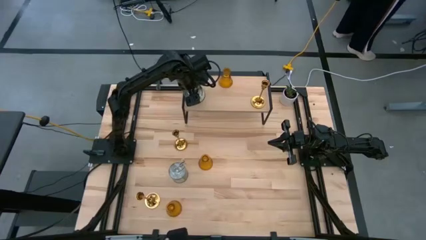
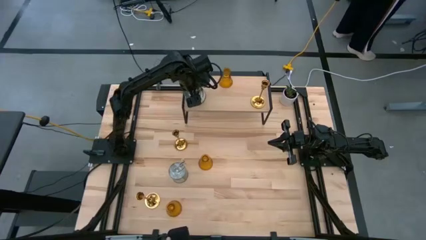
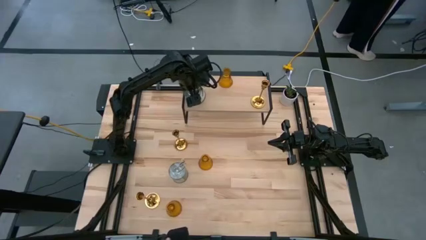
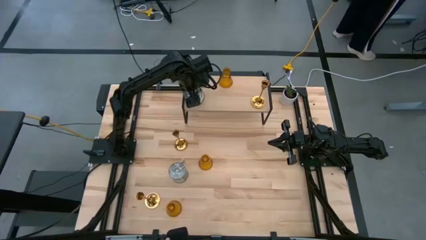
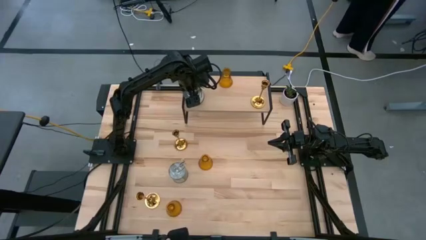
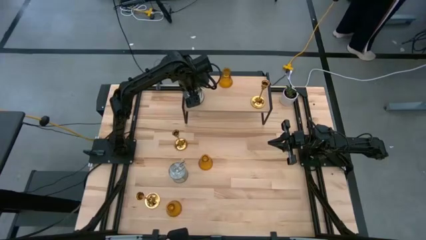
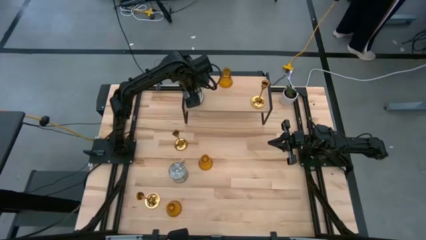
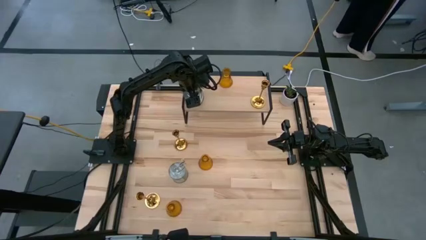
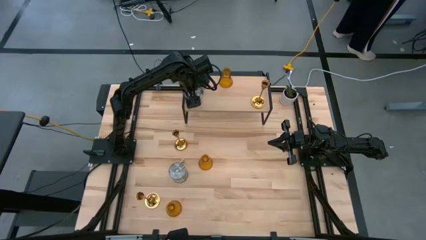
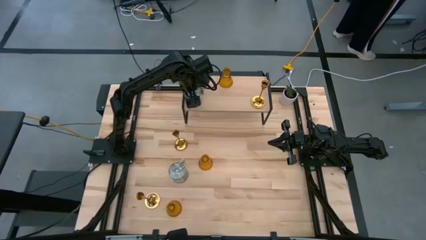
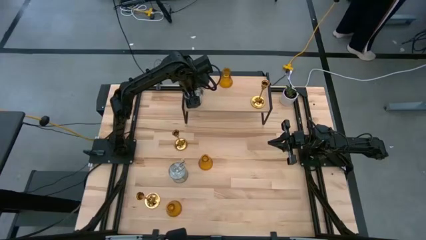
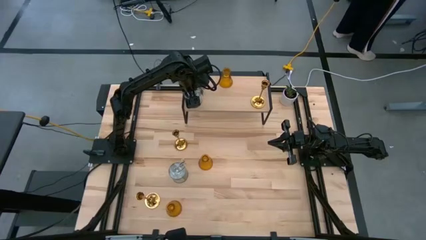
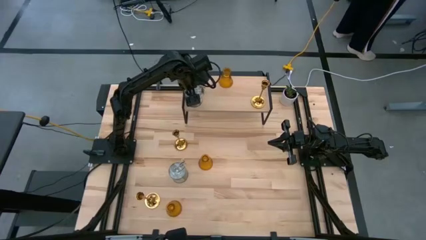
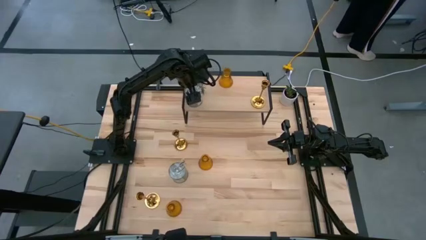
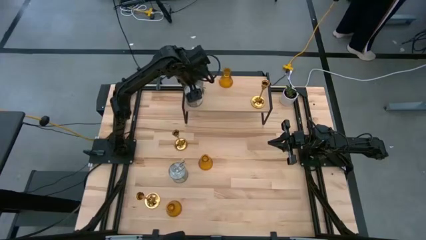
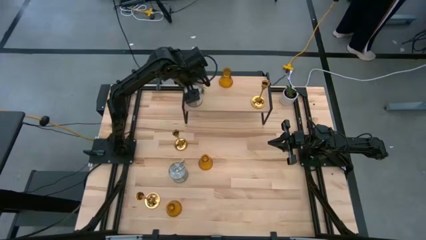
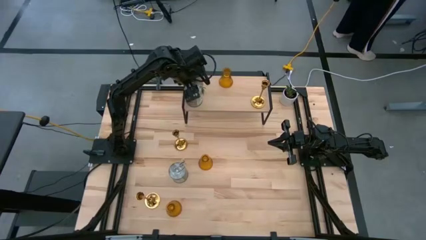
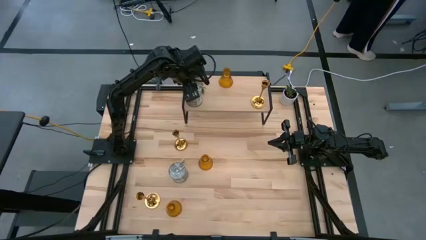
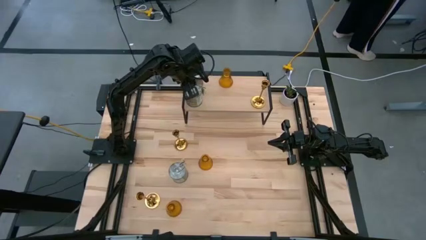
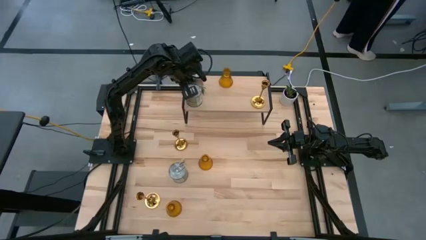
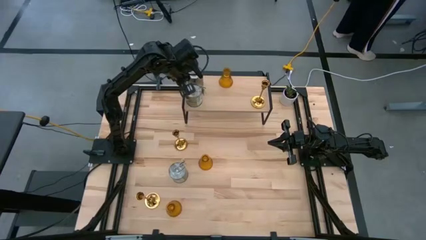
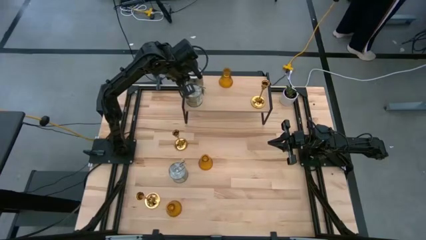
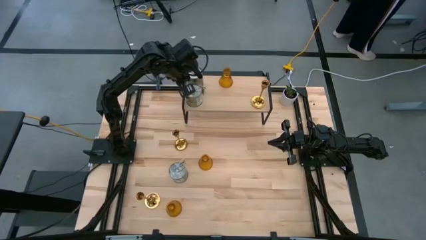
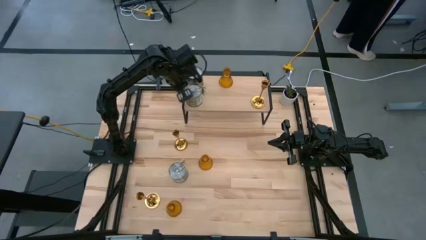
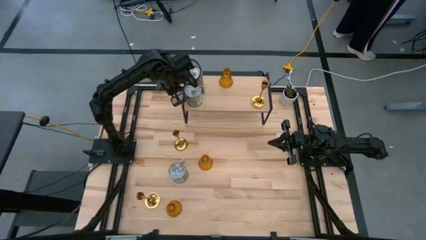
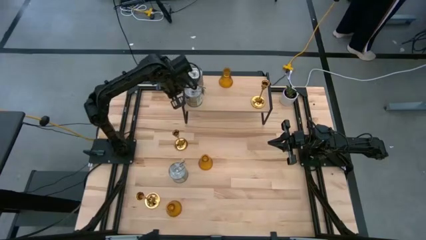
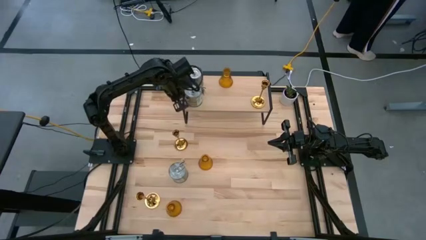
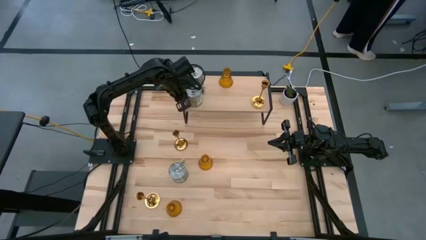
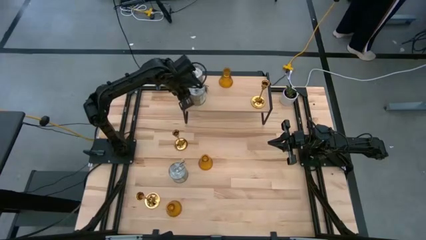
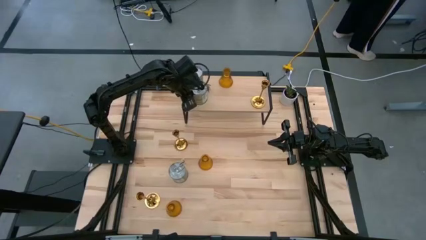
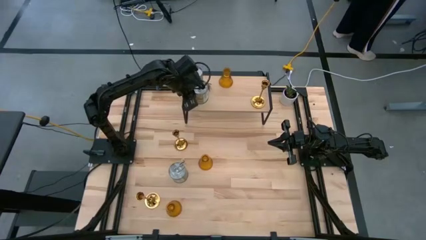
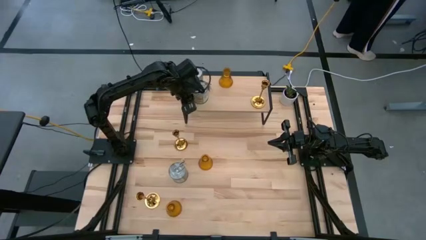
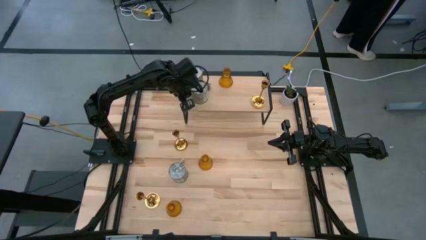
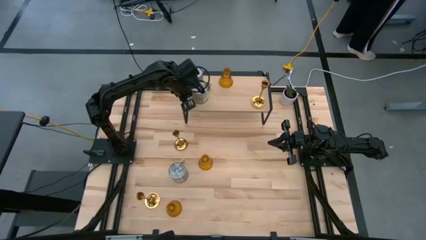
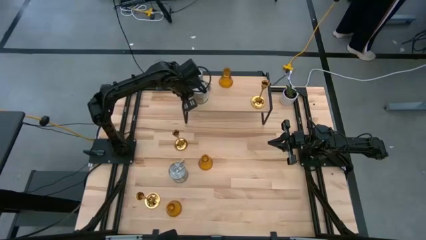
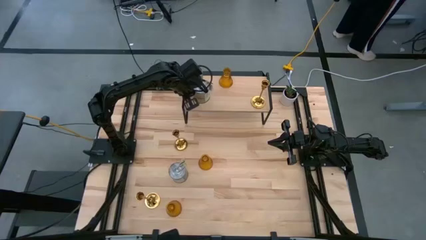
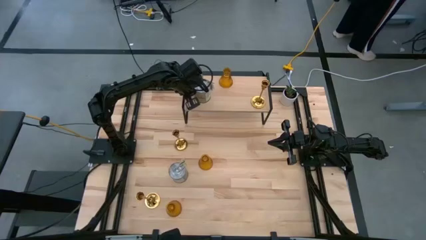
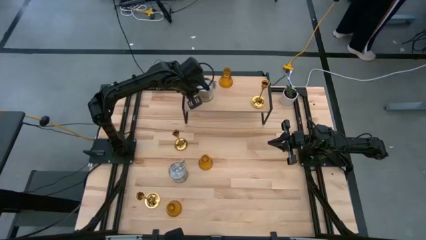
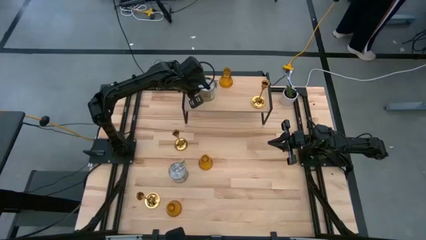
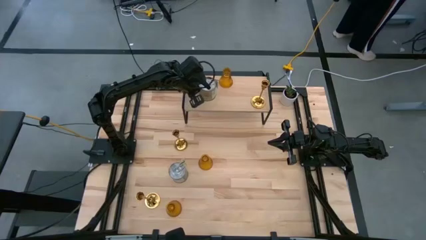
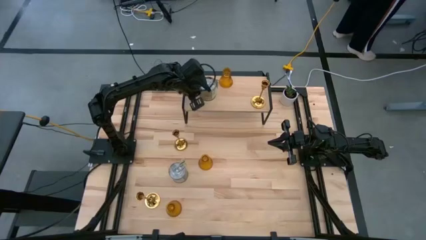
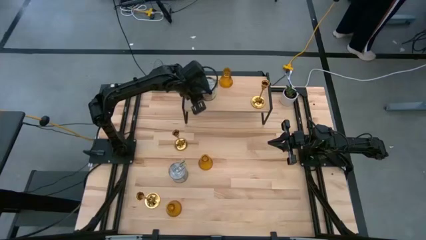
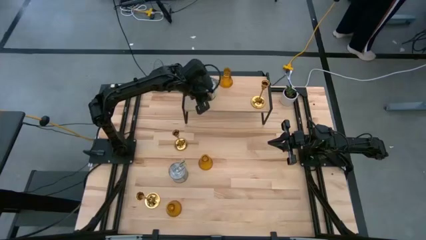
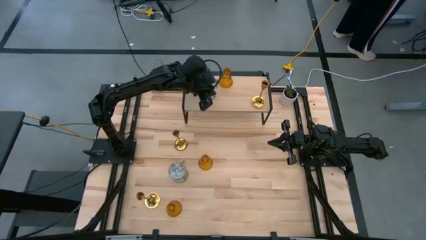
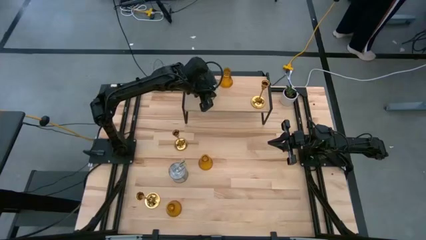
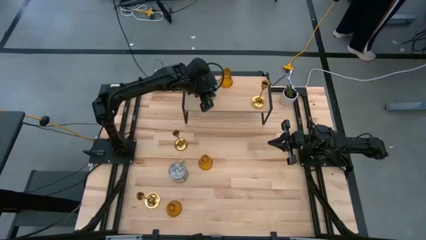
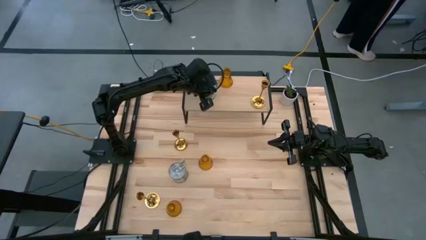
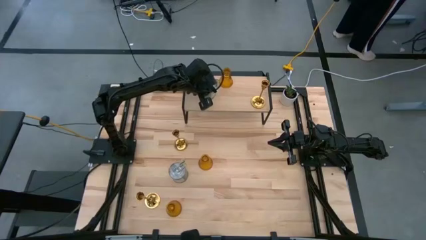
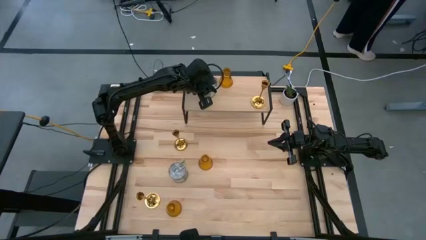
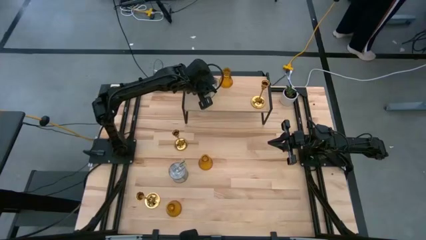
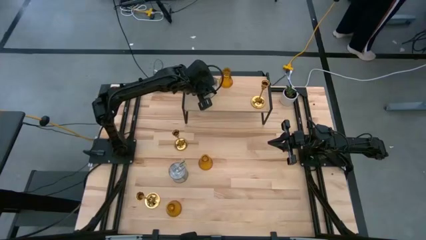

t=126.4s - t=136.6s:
Task: Pick & Place candle stick holders
Put the top scented candle on the shelf aligned with the other scented candle

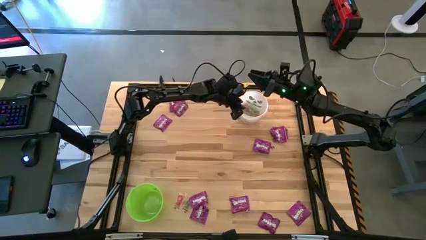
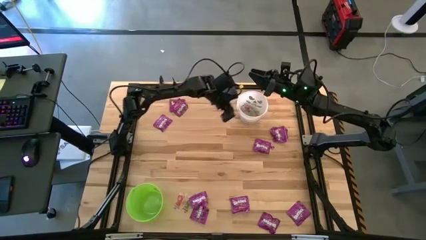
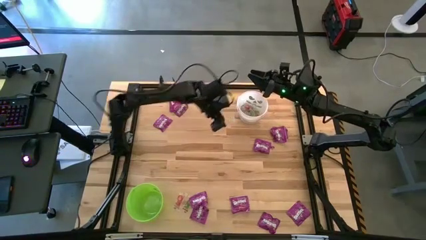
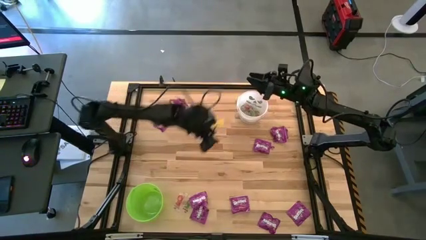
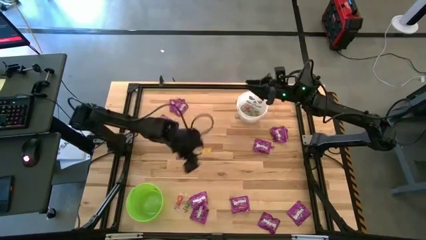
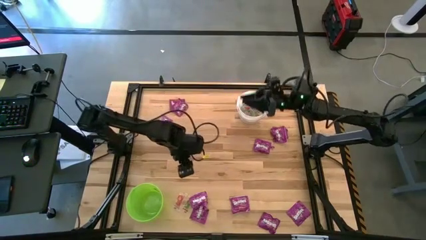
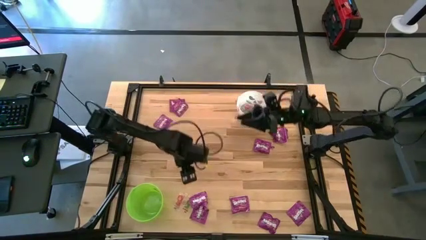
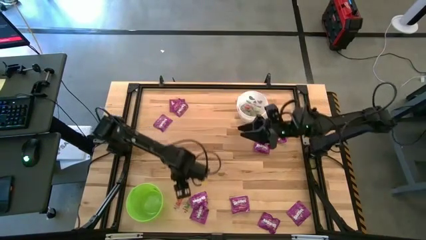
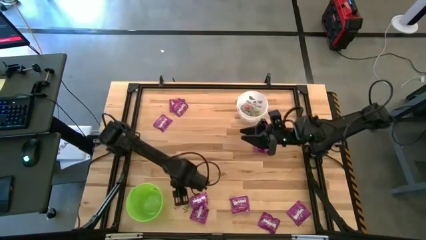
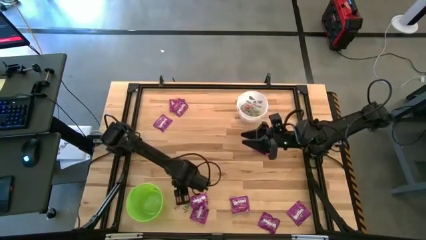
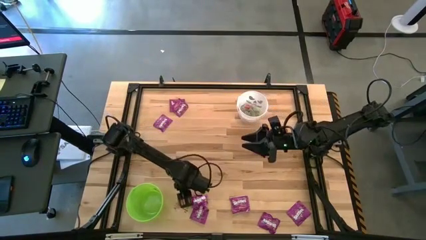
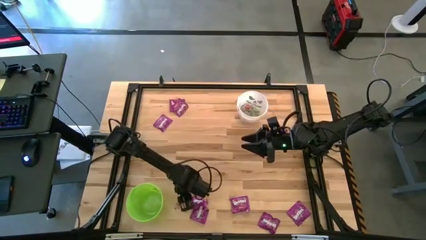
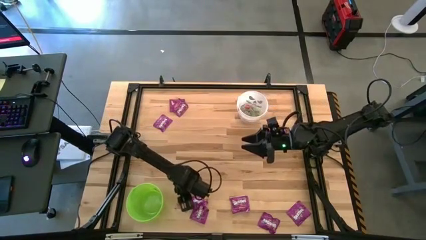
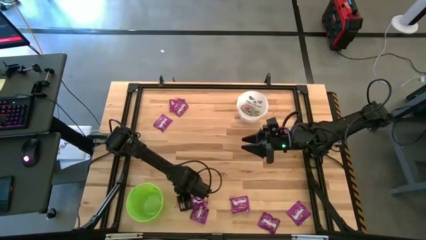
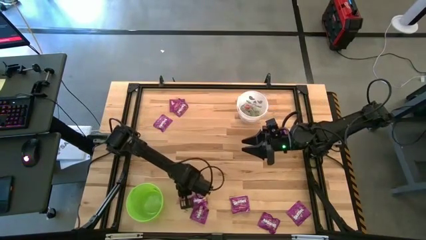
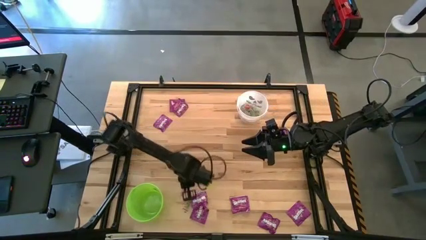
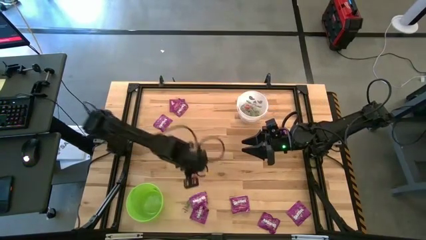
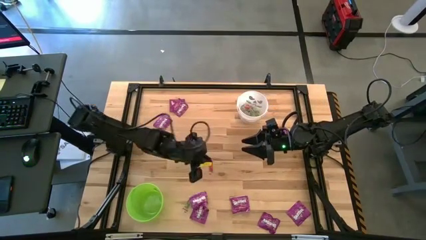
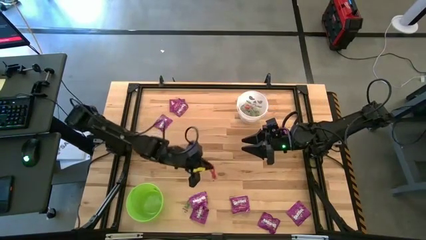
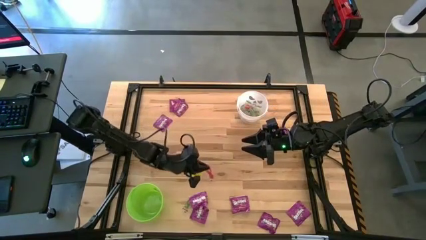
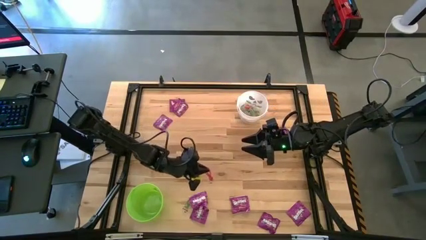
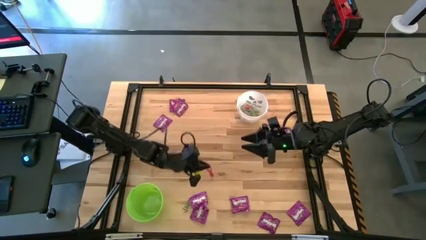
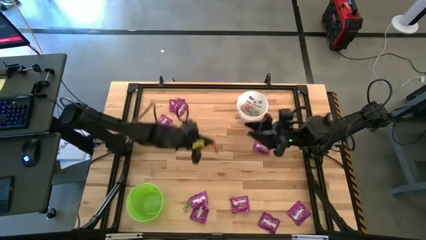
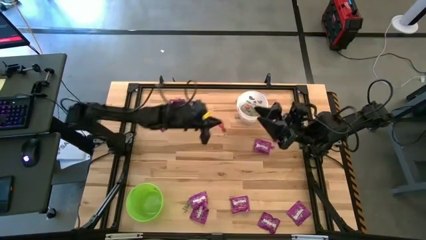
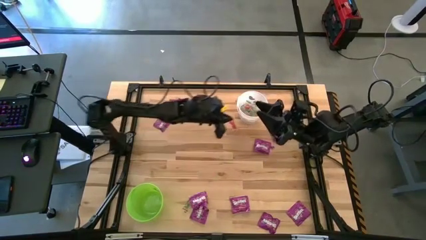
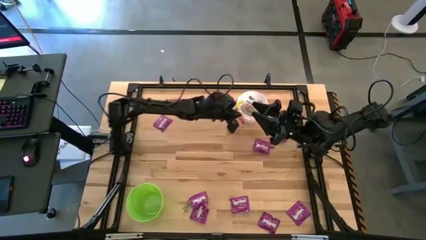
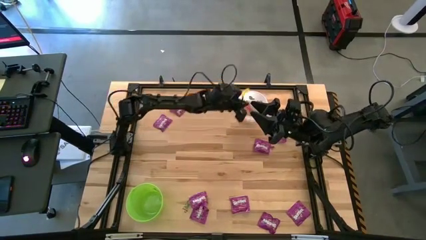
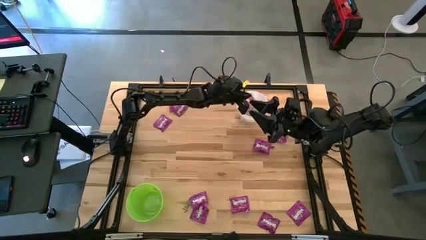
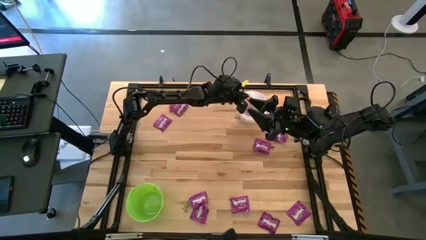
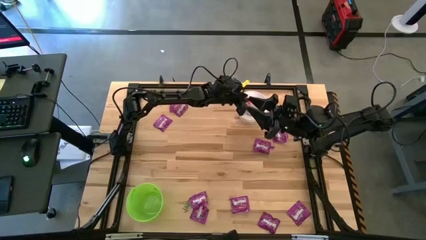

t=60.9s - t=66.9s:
Task: Sort candy by brand, put in halloween buckets
Put the red gummy into the white bucket
